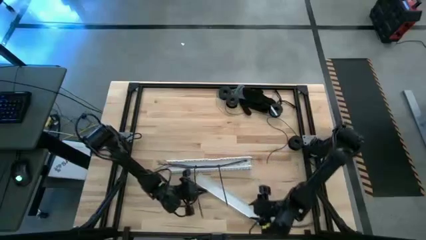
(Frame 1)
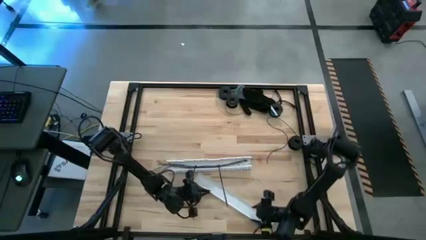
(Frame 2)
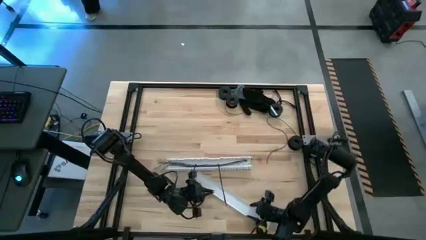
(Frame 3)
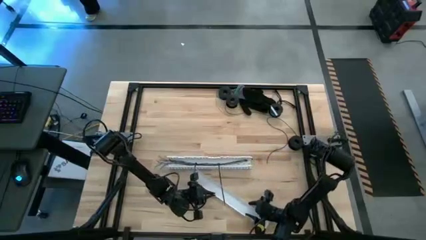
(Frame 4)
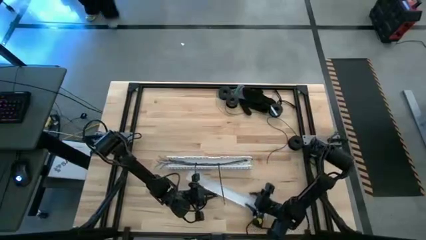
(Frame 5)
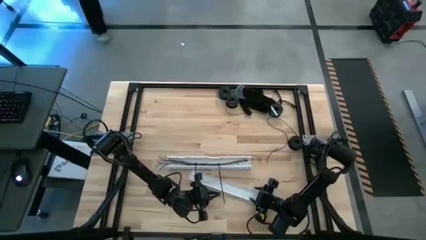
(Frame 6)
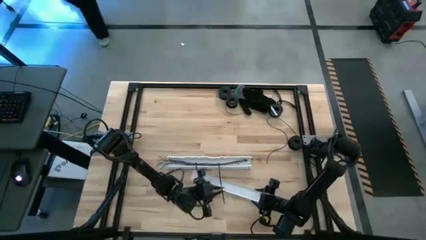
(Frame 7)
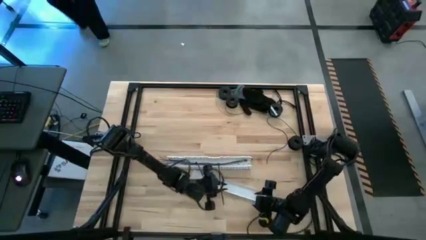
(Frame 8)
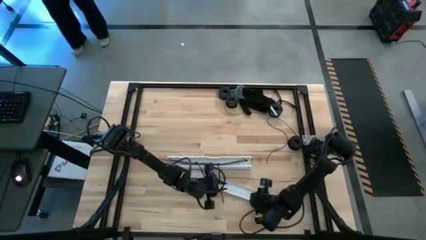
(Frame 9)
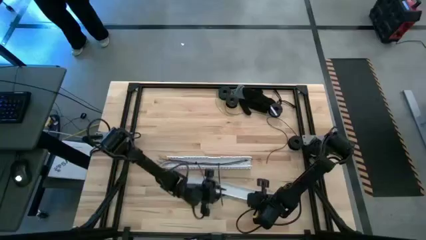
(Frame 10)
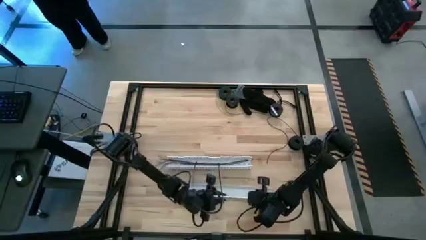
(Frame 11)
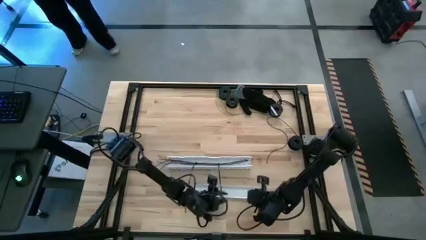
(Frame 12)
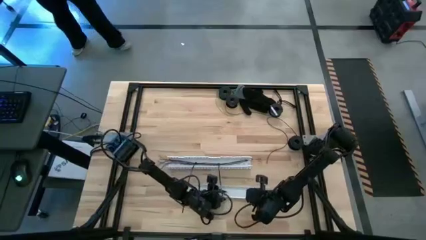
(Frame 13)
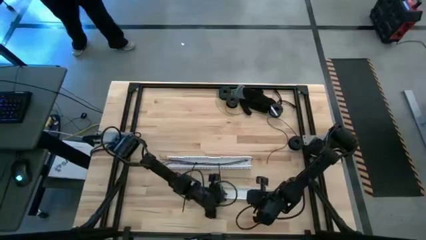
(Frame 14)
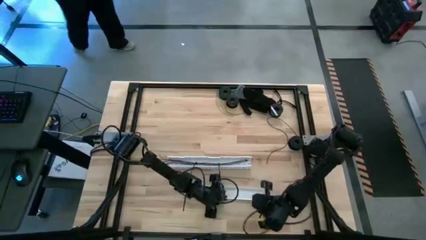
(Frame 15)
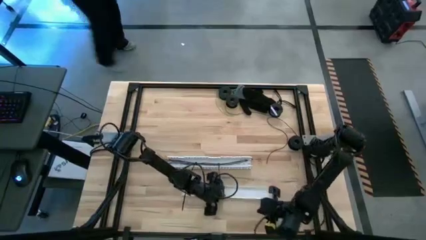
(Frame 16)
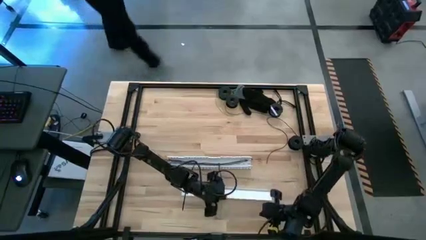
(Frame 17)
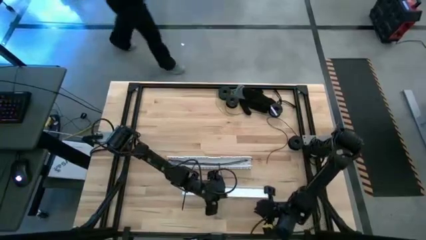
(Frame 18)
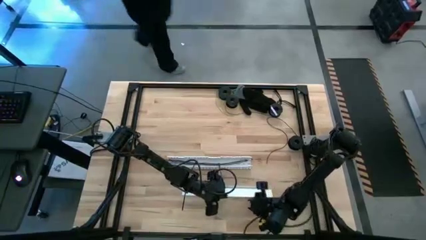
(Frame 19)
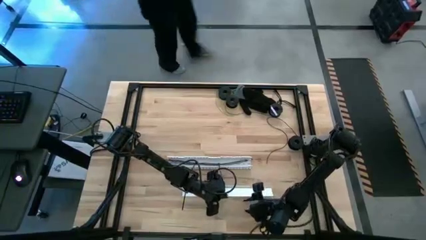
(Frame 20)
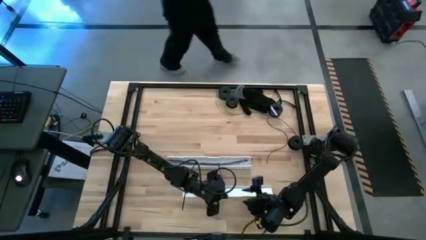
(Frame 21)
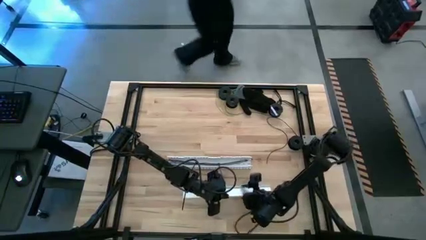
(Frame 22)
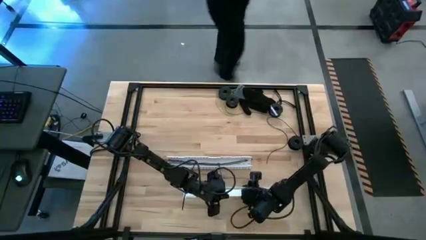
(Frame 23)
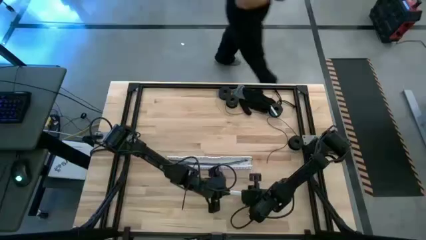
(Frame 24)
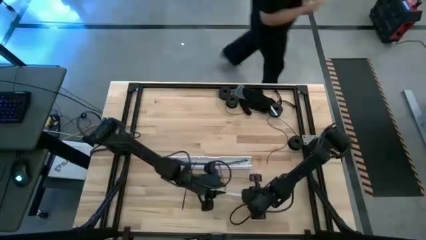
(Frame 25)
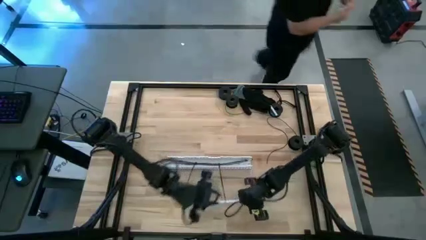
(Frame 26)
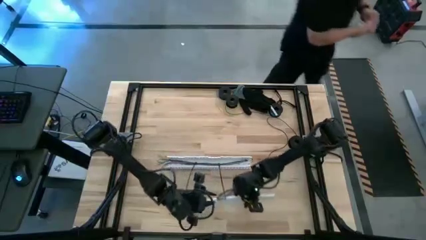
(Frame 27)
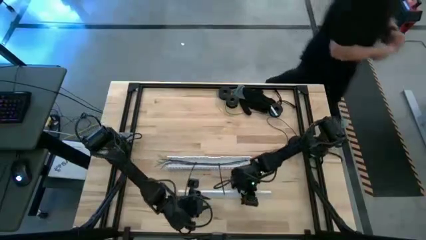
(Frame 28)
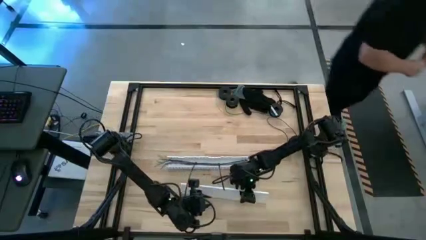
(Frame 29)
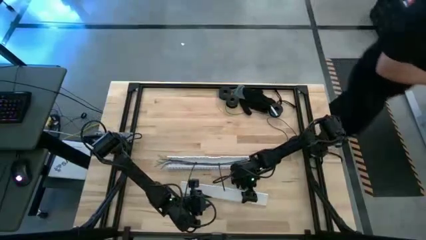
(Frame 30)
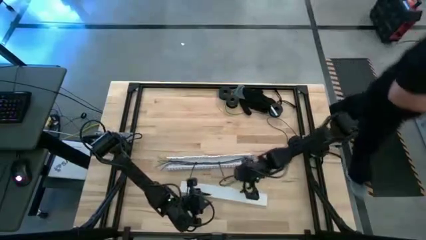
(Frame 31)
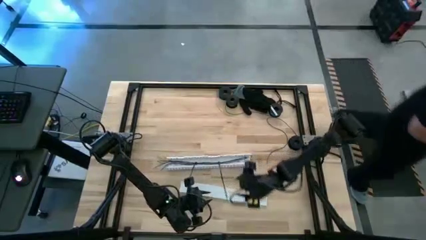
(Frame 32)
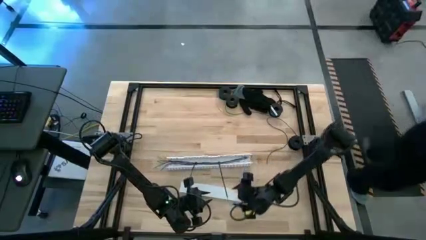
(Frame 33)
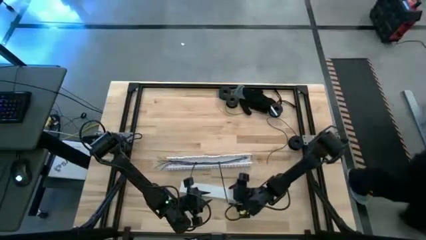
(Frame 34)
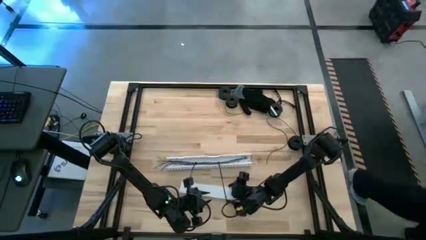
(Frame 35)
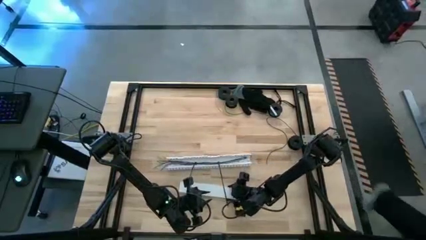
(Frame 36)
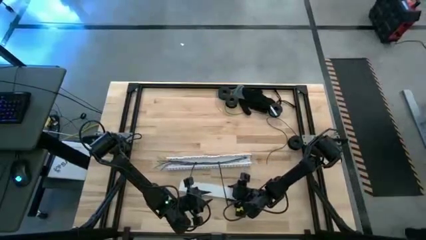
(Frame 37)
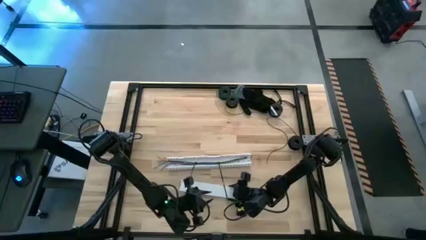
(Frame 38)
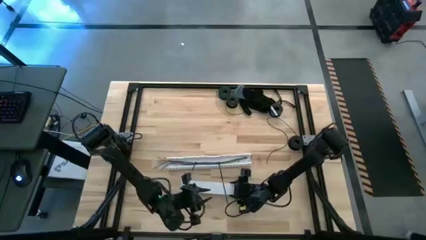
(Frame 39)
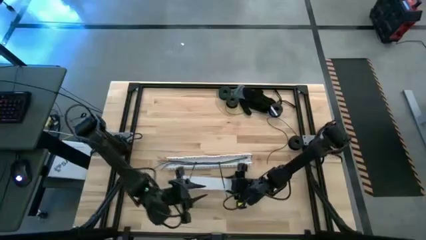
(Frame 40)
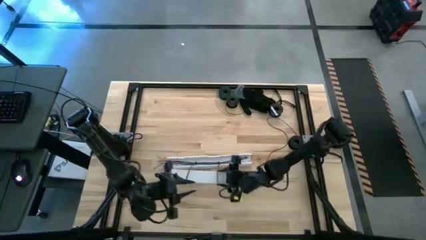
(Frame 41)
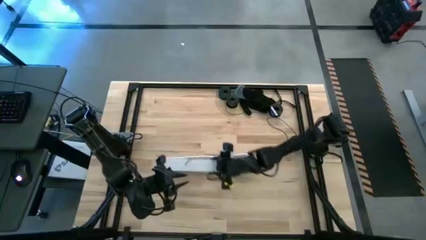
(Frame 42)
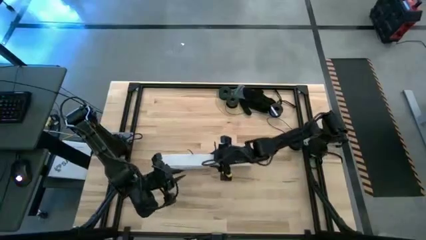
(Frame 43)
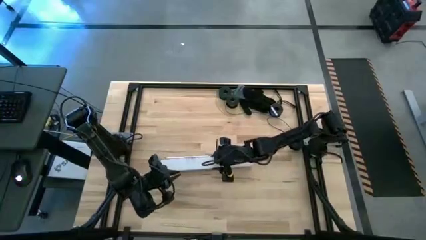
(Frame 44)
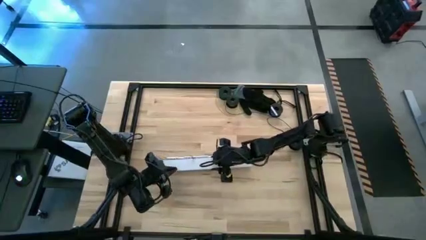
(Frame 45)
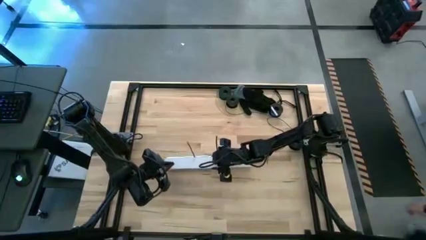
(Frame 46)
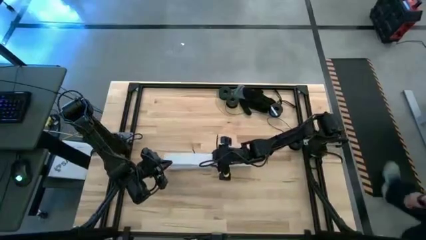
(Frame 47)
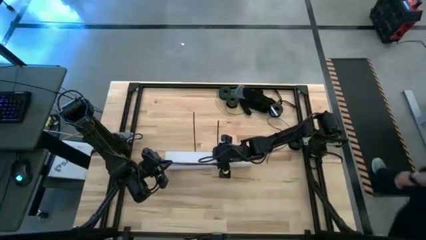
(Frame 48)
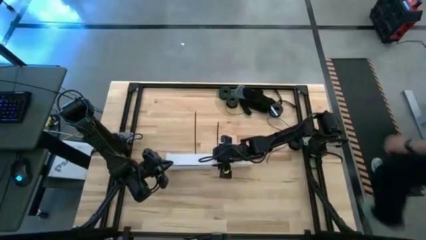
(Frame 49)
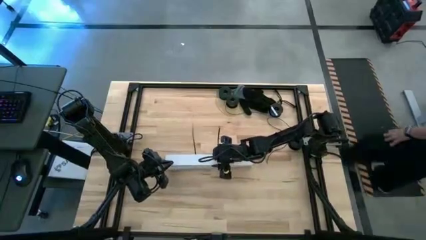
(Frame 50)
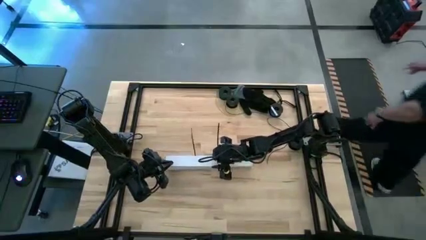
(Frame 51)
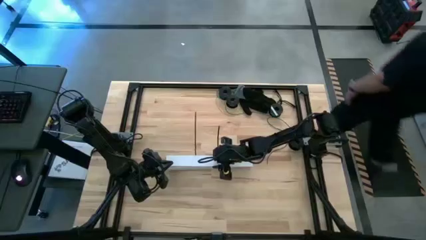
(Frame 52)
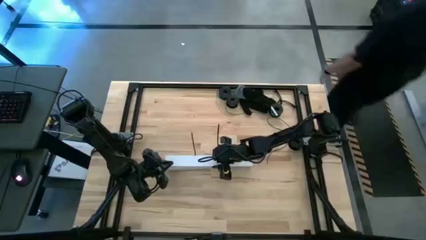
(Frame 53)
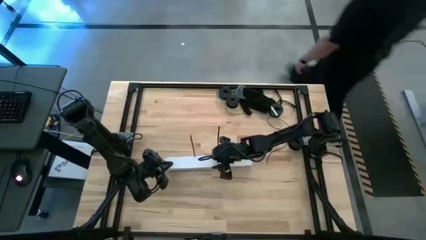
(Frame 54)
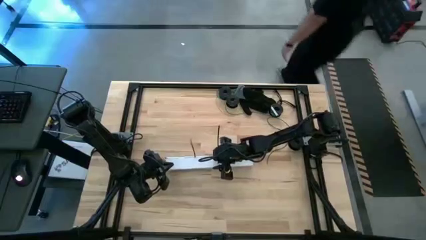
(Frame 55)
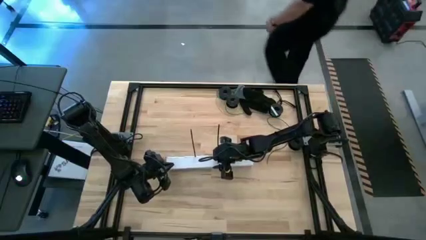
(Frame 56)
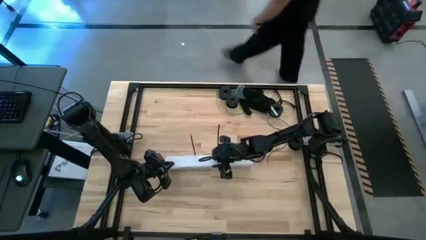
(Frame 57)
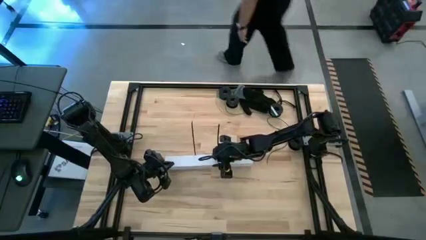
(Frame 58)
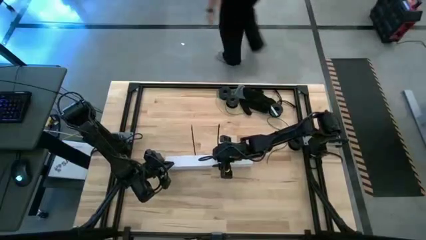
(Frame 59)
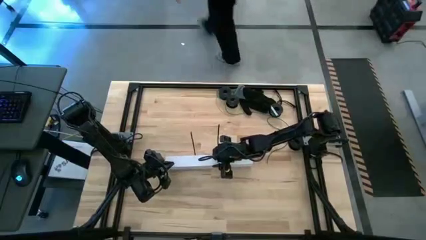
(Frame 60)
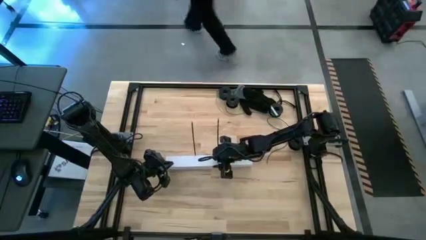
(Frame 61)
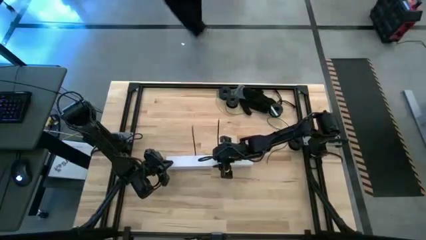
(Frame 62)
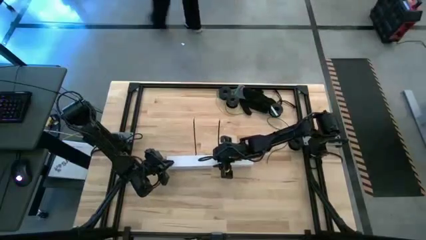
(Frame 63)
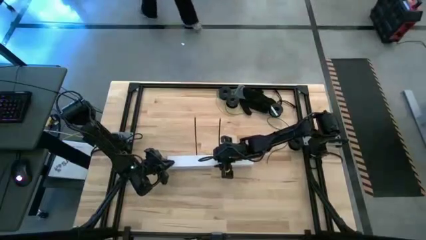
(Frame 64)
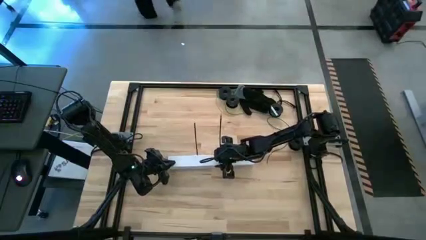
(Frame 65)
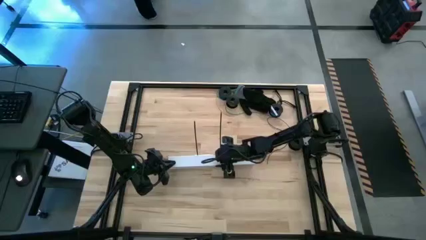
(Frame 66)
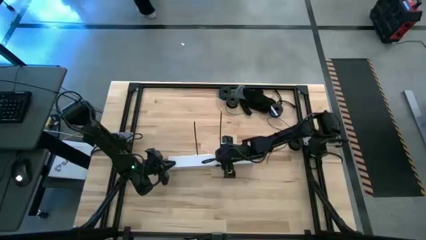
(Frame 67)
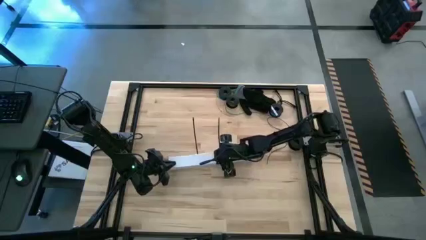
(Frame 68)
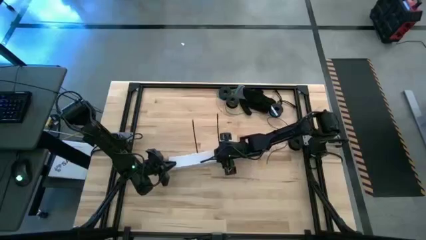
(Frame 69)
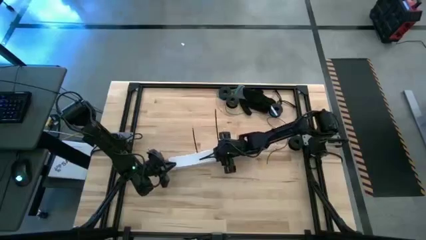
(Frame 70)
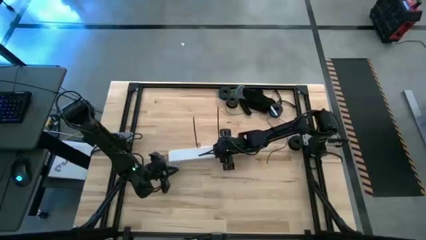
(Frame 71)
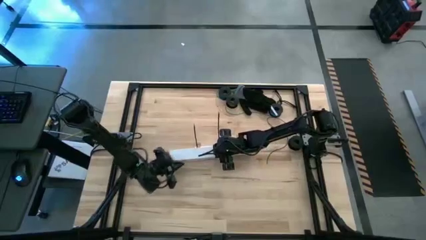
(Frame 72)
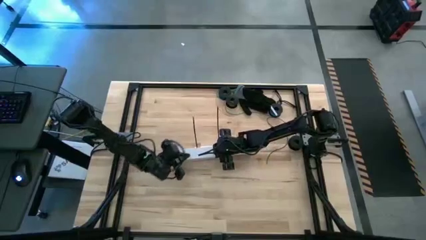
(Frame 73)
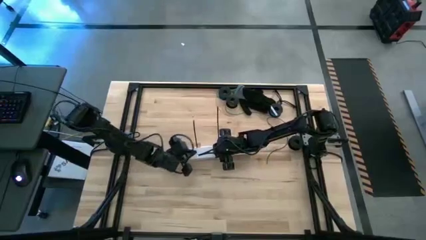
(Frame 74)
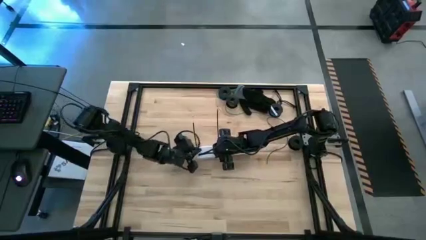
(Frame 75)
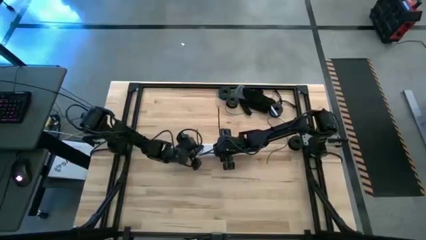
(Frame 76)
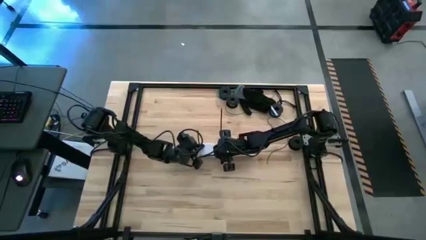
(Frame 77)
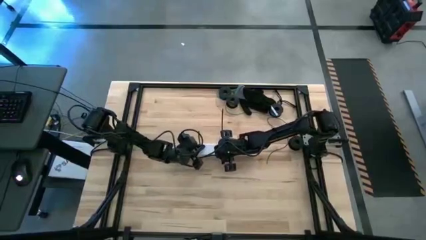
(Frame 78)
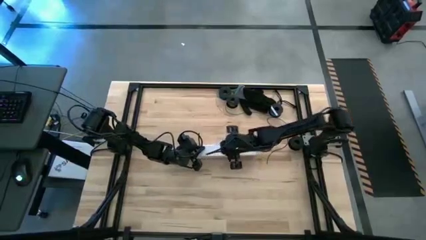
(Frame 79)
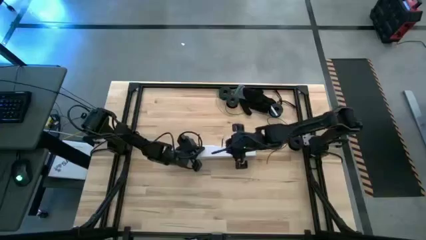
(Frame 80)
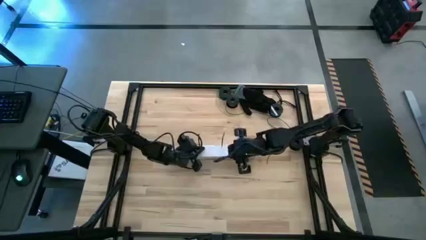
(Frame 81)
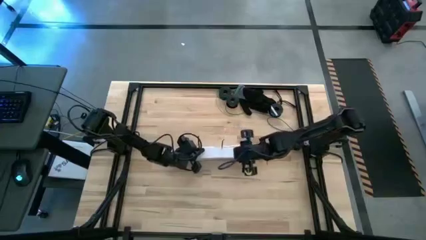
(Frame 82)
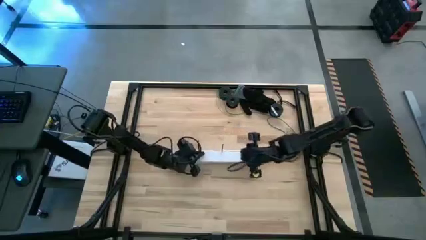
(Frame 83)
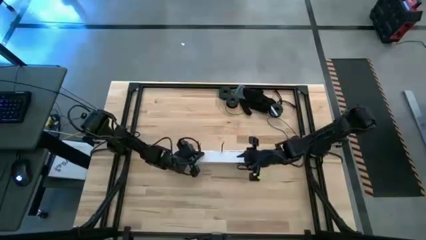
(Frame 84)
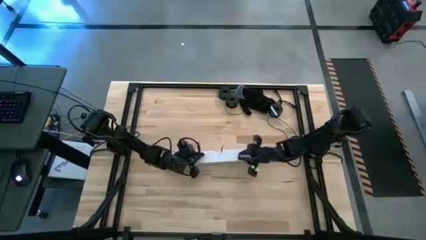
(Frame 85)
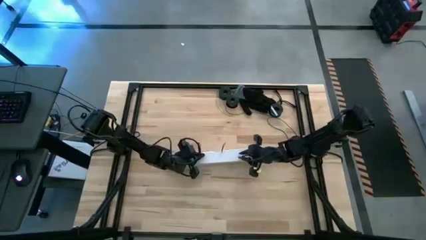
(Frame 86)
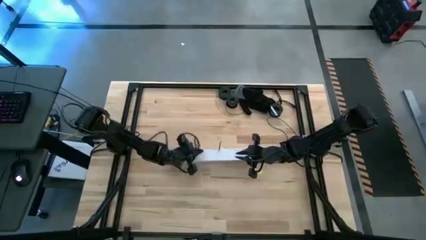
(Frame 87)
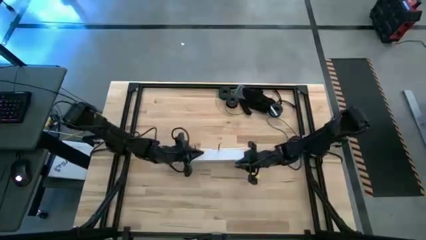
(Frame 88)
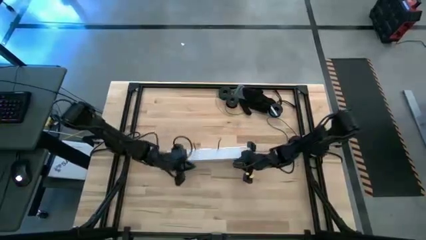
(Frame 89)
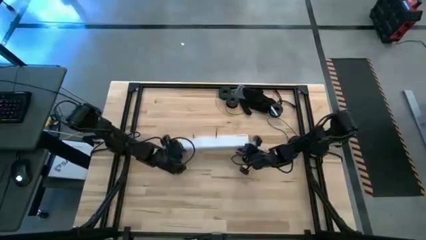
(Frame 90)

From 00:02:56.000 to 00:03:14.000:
Task: Ziptie cables
Close the white cable duct lid
